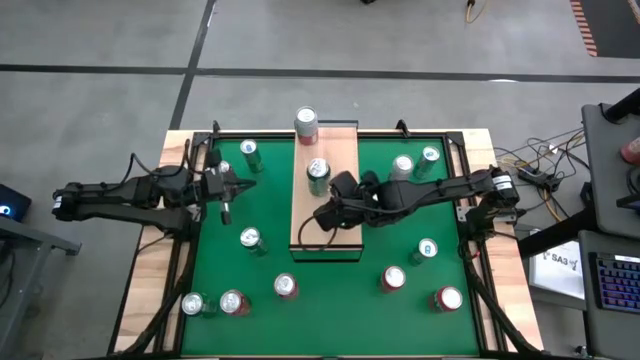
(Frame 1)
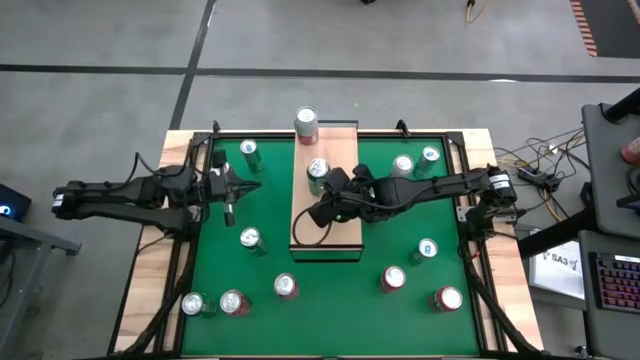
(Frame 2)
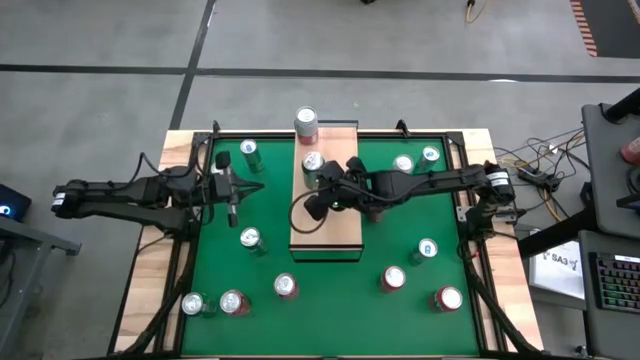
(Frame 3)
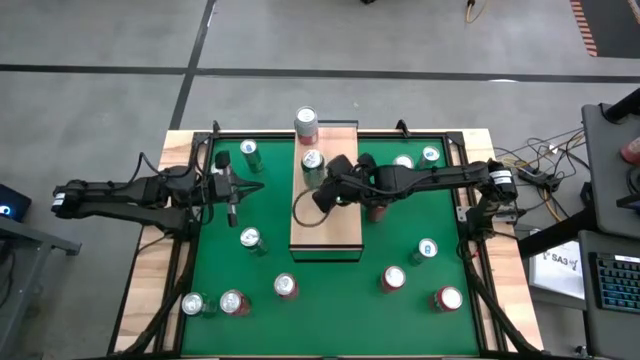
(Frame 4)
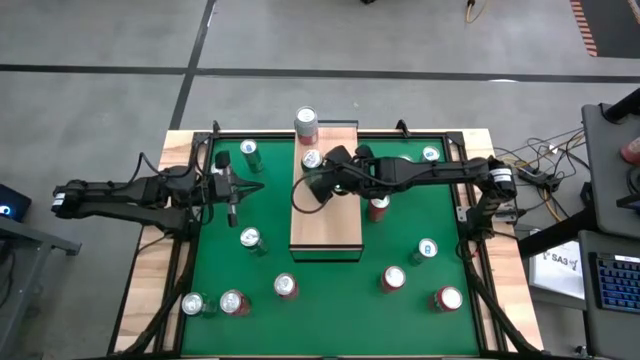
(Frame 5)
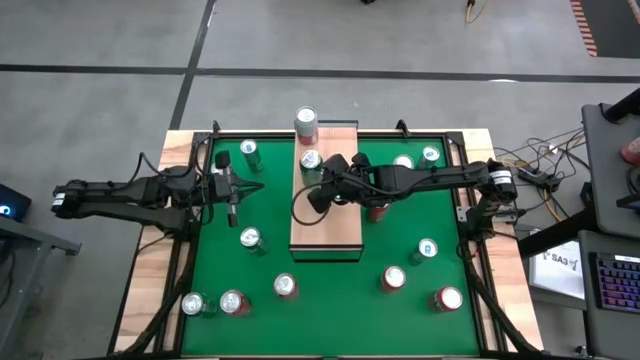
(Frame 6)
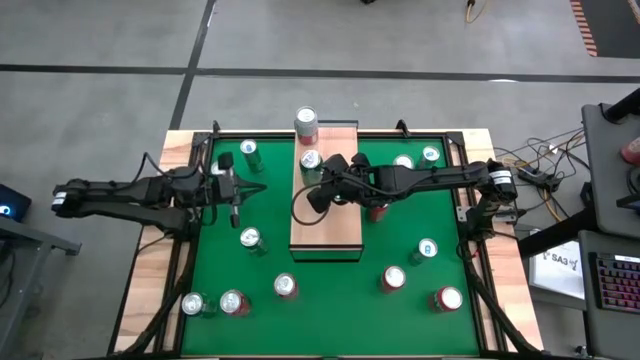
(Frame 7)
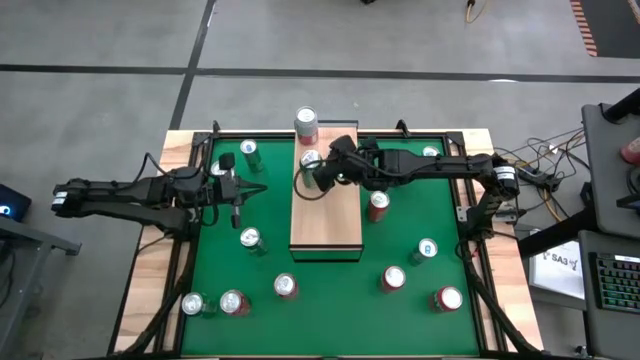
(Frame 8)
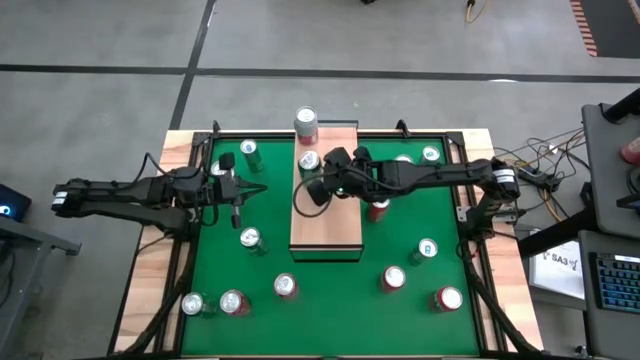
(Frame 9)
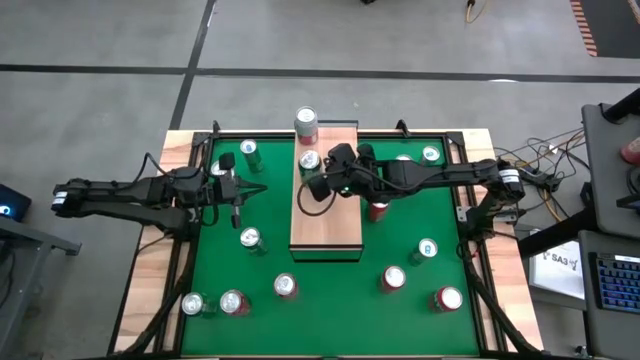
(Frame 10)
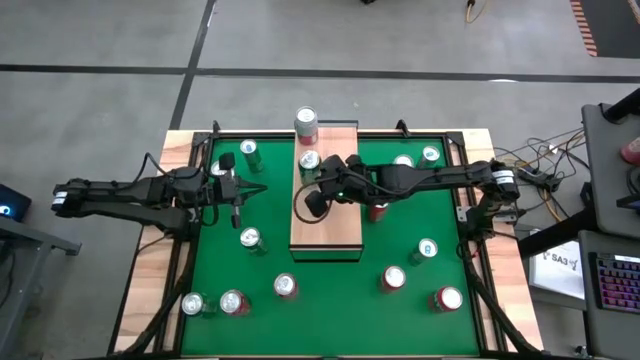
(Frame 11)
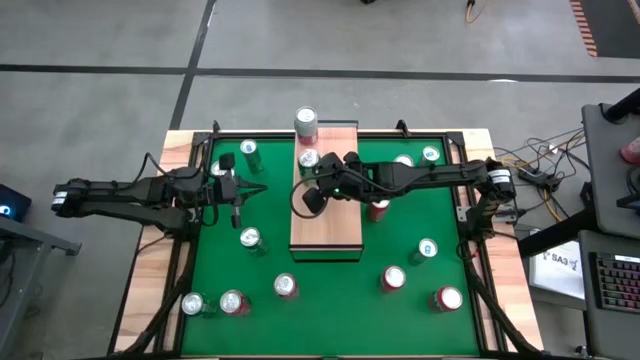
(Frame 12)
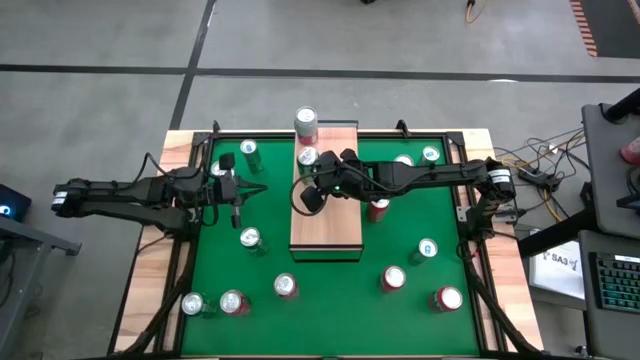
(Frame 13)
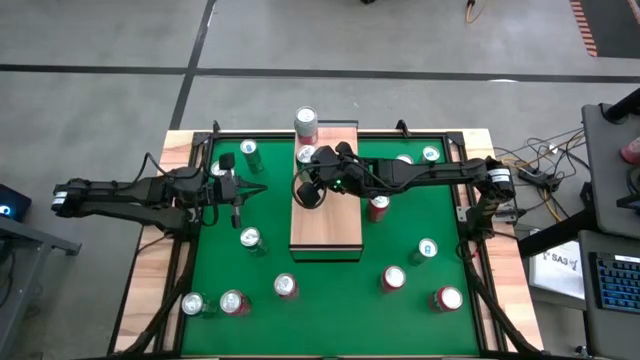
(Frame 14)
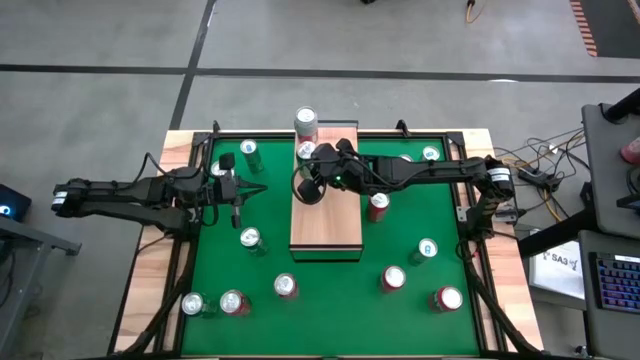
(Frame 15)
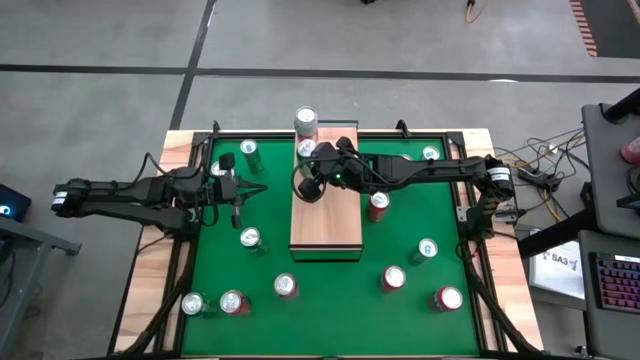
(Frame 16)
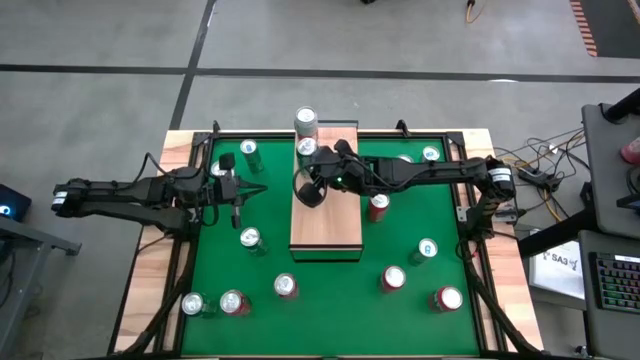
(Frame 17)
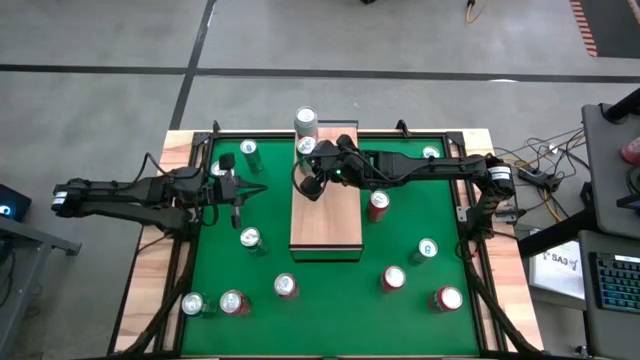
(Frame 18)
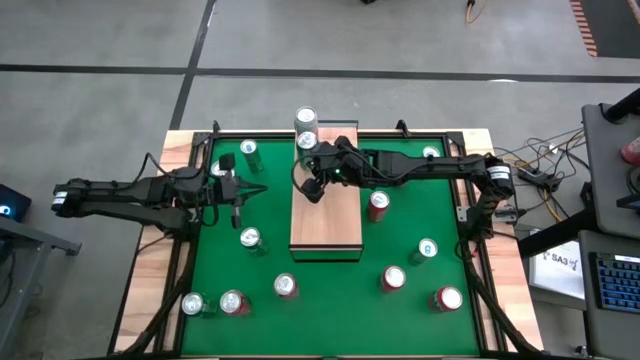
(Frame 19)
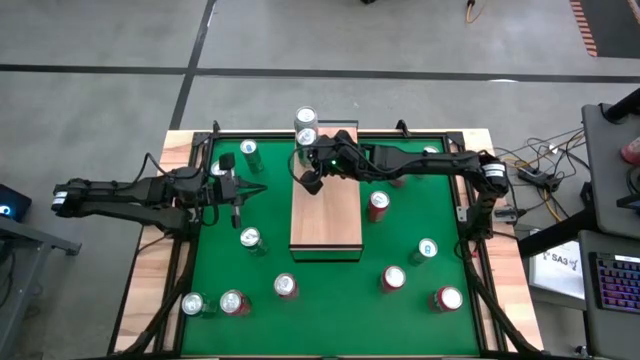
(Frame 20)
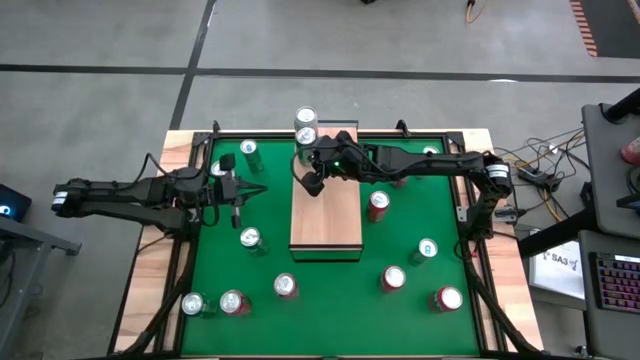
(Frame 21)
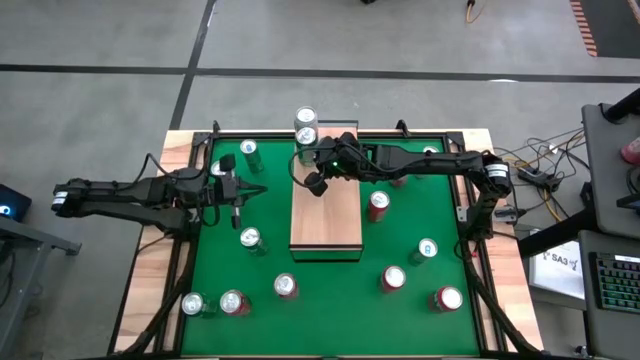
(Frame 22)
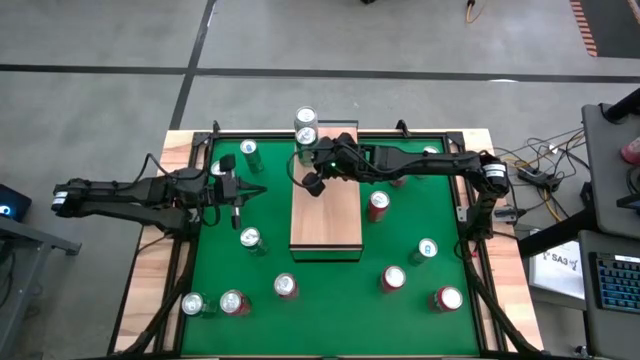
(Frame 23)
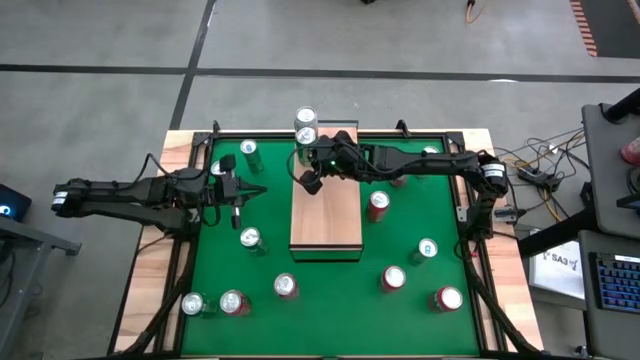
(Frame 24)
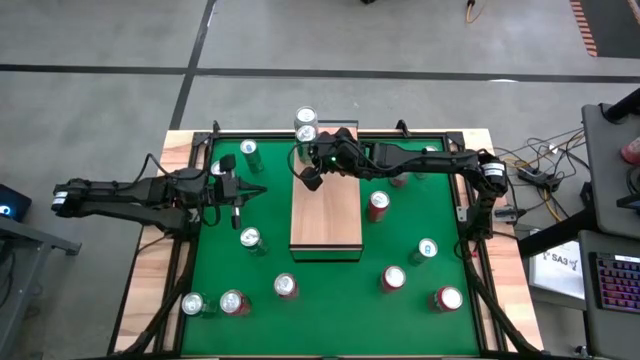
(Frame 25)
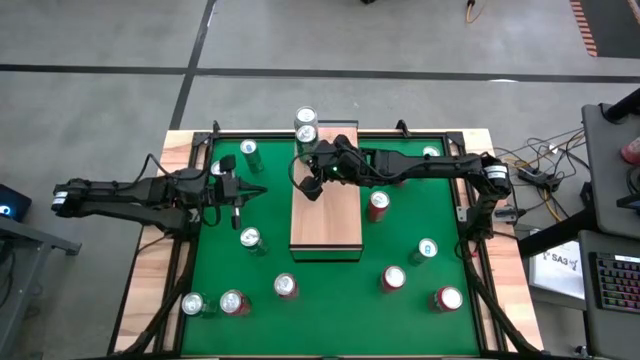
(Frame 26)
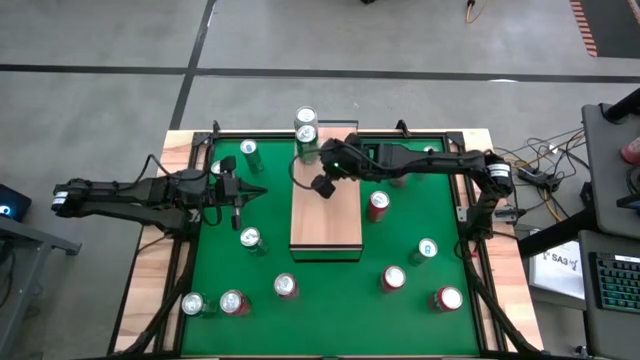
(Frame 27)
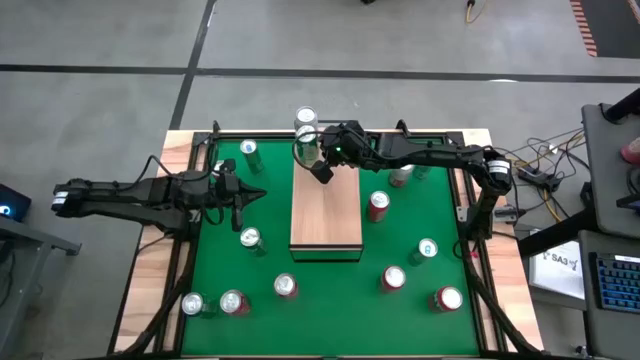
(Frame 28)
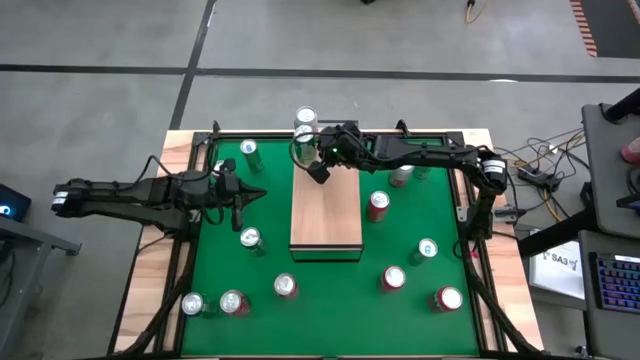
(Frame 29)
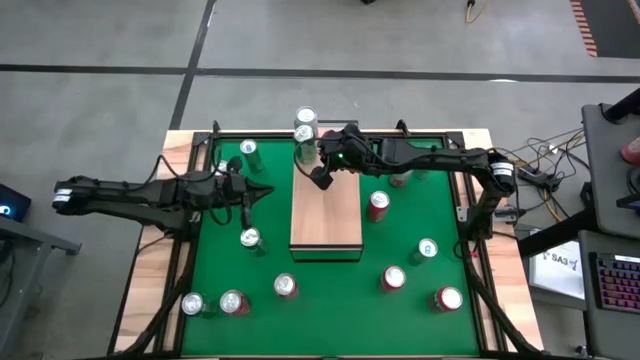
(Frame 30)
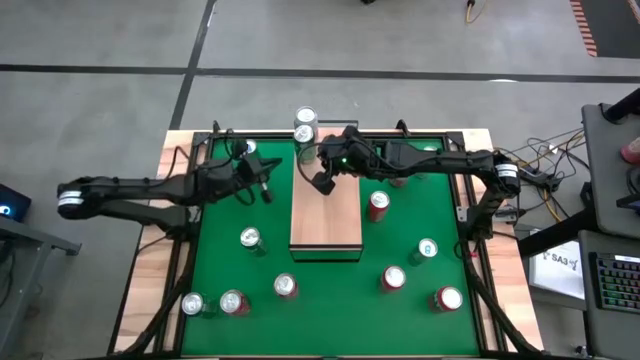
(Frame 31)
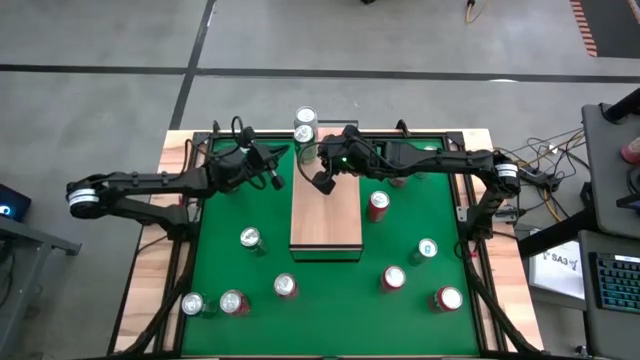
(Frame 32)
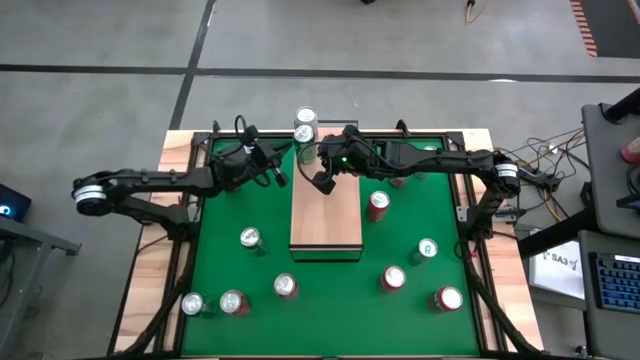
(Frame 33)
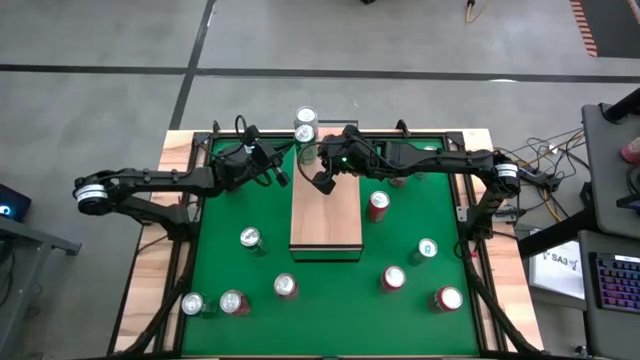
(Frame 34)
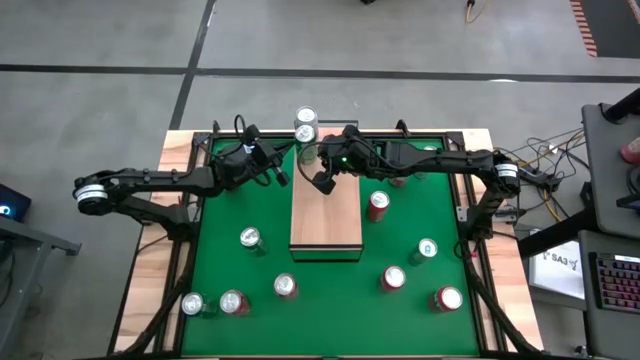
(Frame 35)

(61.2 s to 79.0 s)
Task: Place canned beverage on shelf
Put the green can on the shelf

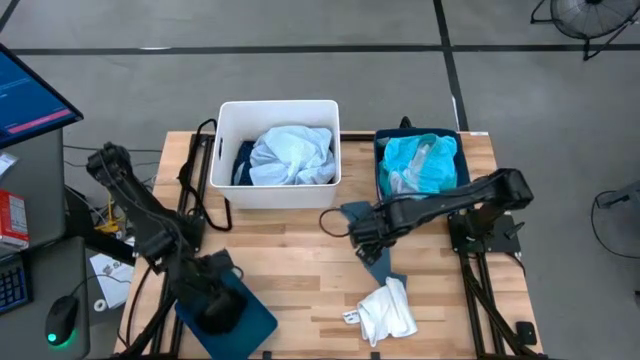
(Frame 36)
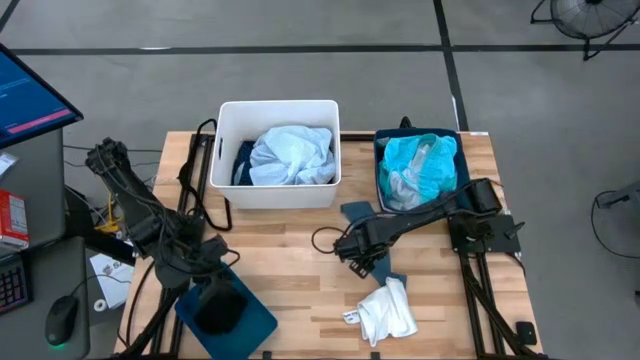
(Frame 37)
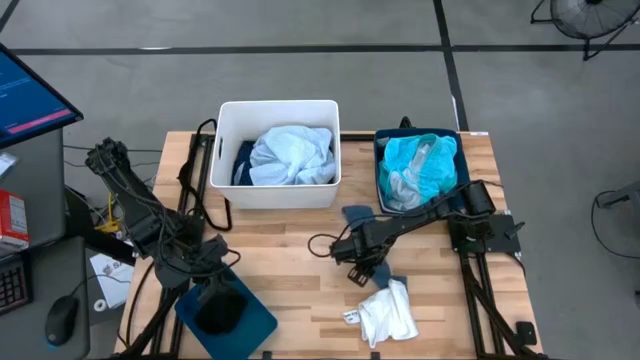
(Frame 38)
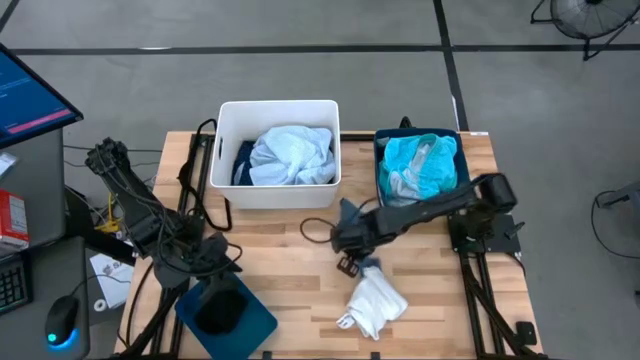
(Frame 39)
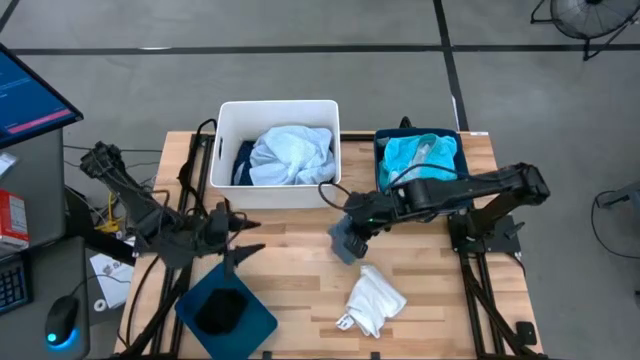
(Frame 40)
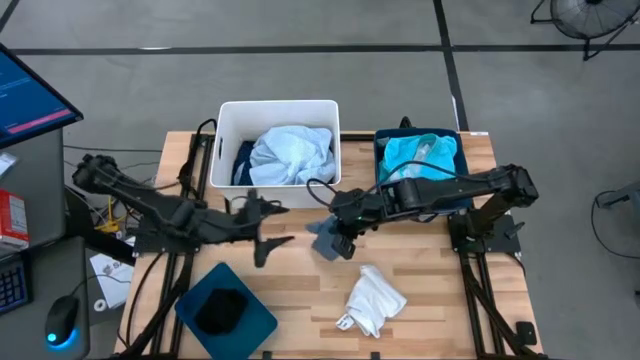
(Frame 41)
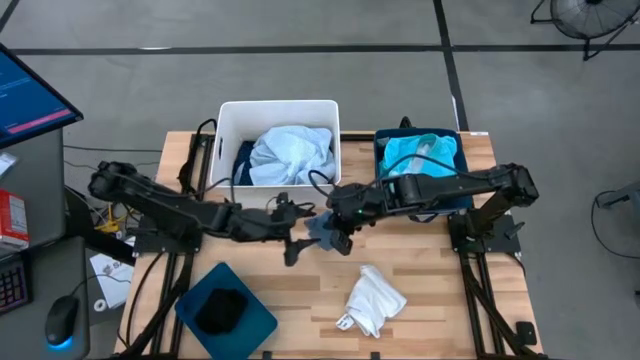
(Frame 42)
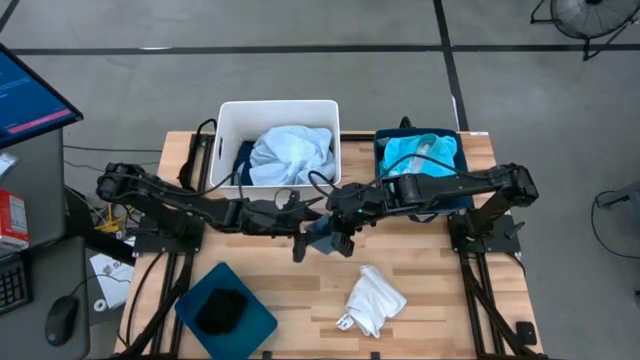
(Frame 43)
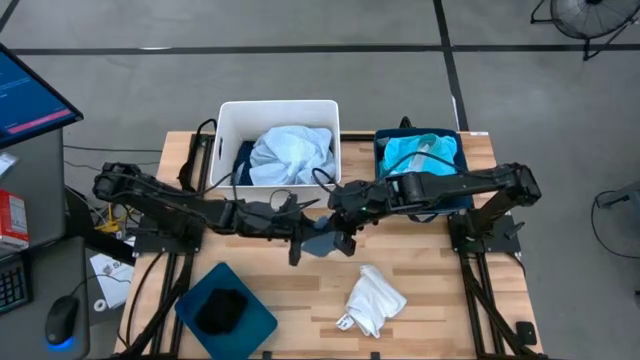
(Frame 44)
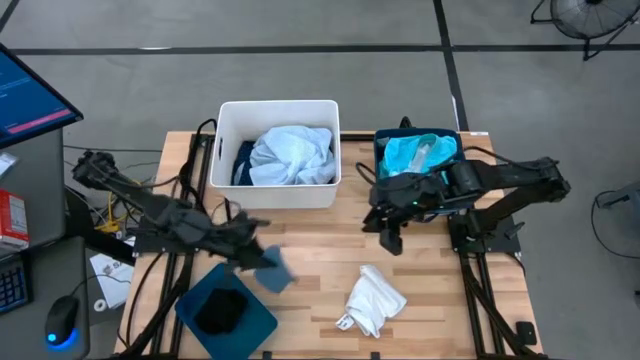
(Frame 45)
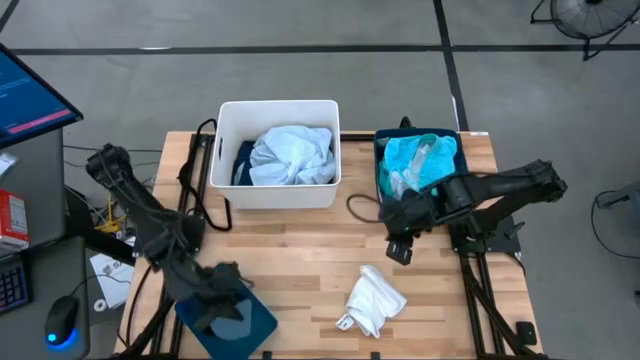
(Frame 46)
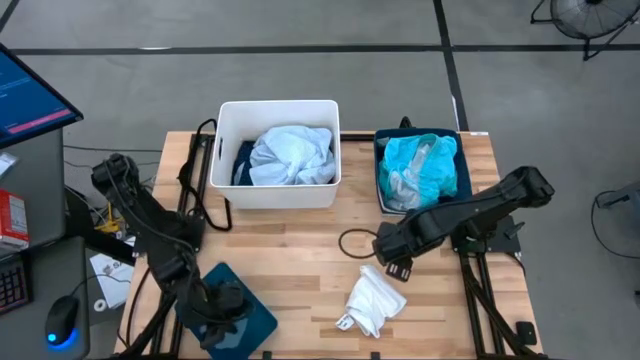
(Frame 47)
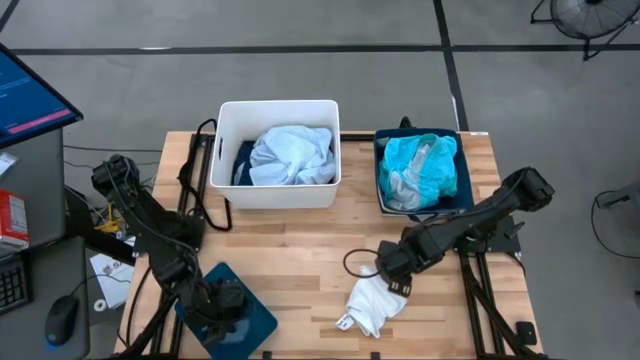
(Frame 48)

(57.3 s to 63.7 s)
Task: Pick & Place Cloths
Put the gray sock into the blue bin
